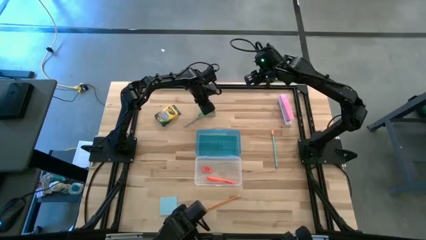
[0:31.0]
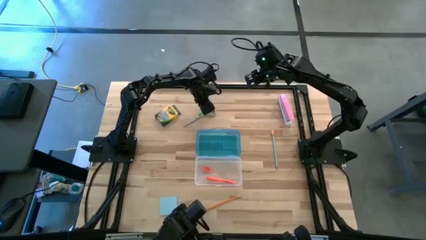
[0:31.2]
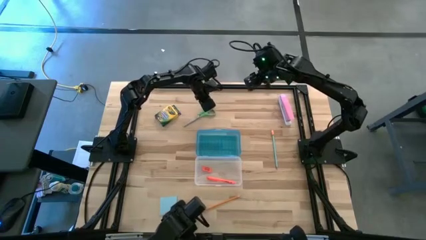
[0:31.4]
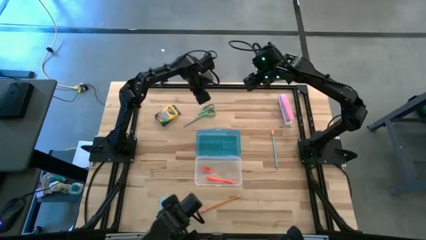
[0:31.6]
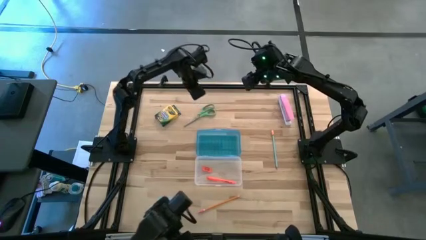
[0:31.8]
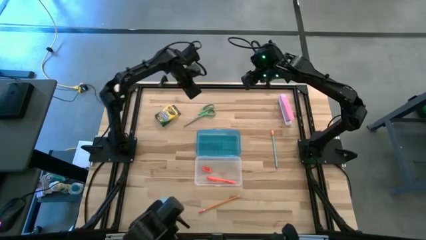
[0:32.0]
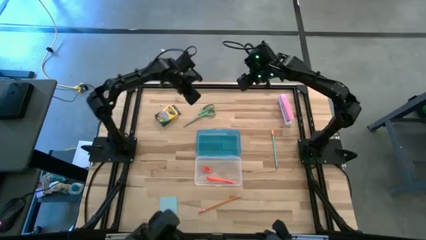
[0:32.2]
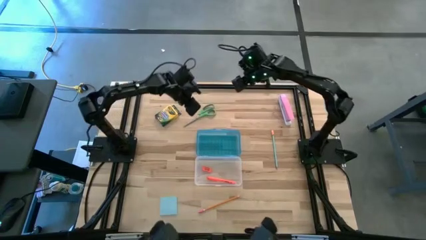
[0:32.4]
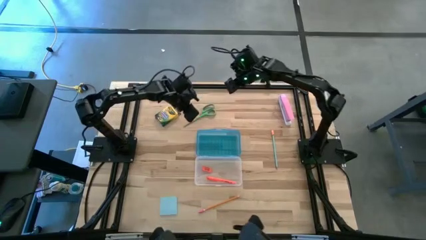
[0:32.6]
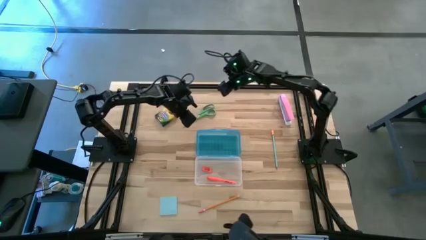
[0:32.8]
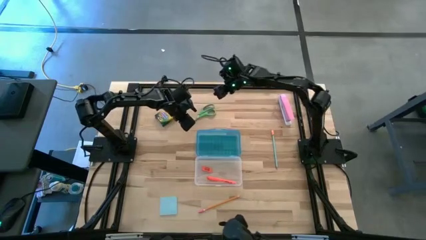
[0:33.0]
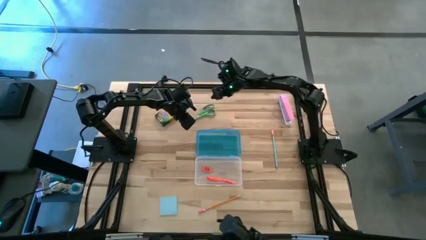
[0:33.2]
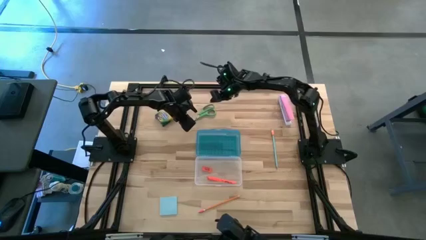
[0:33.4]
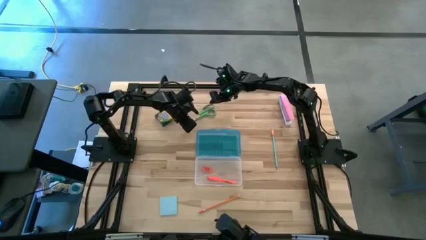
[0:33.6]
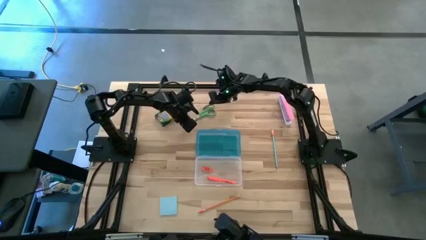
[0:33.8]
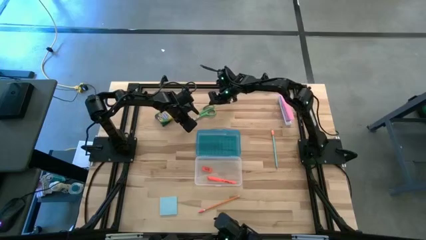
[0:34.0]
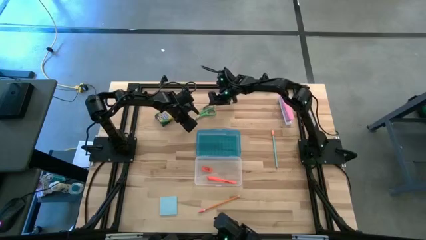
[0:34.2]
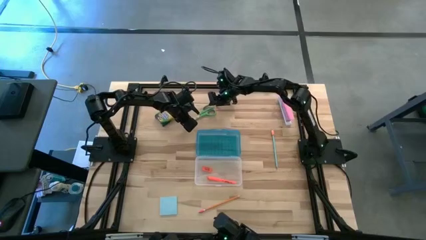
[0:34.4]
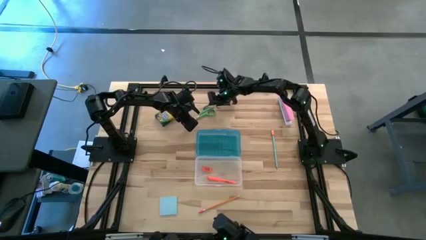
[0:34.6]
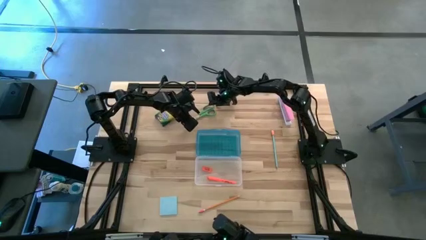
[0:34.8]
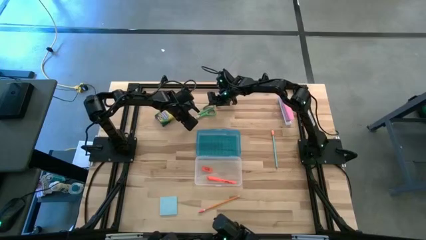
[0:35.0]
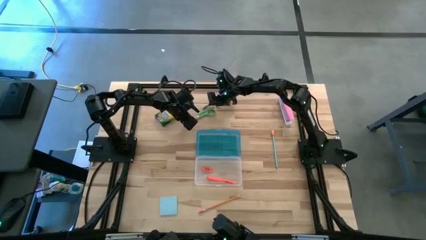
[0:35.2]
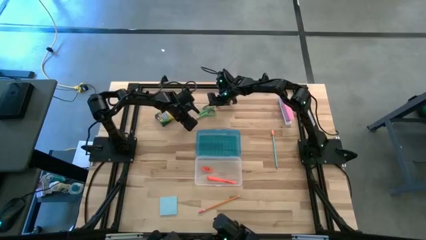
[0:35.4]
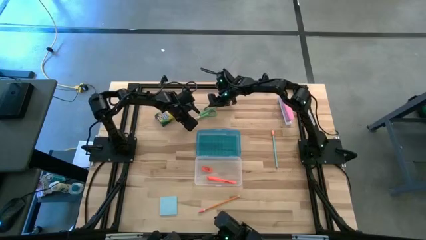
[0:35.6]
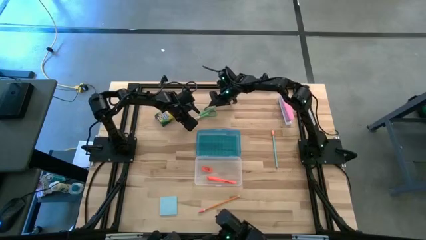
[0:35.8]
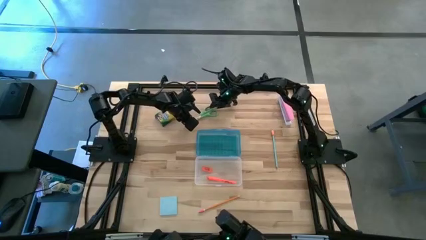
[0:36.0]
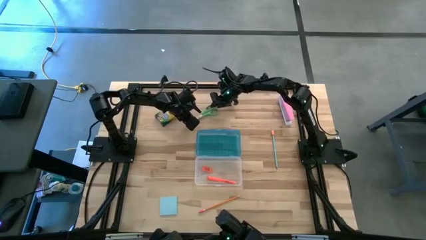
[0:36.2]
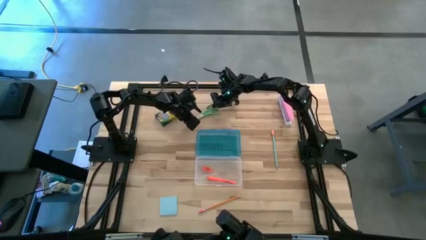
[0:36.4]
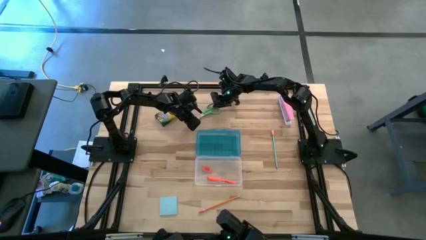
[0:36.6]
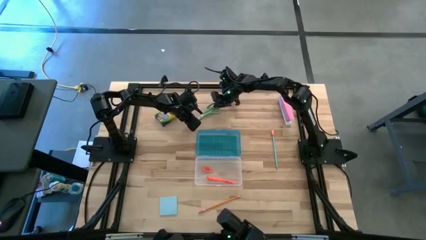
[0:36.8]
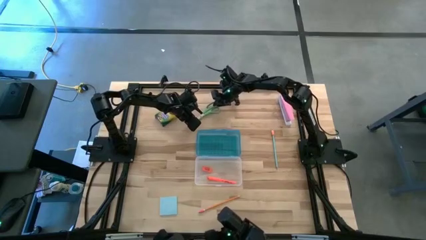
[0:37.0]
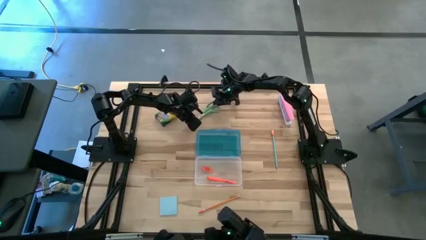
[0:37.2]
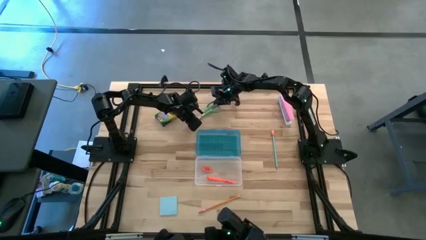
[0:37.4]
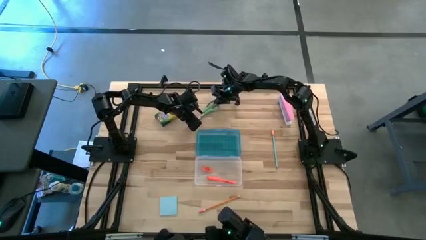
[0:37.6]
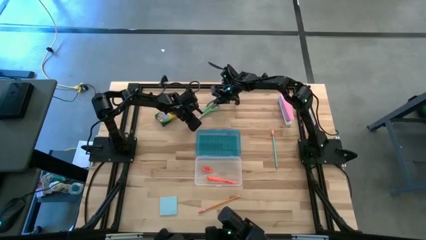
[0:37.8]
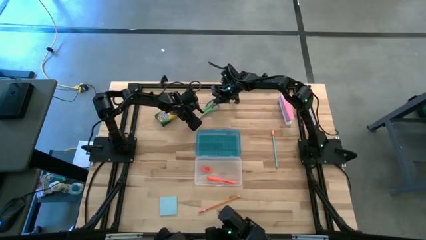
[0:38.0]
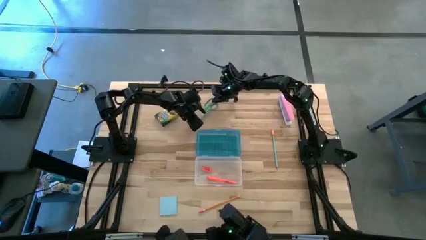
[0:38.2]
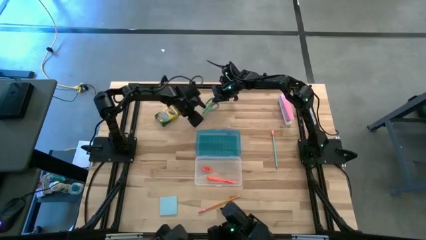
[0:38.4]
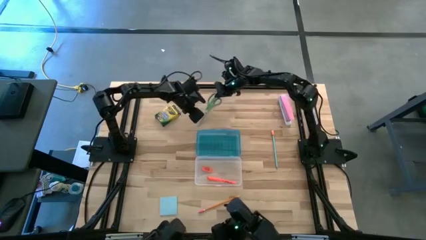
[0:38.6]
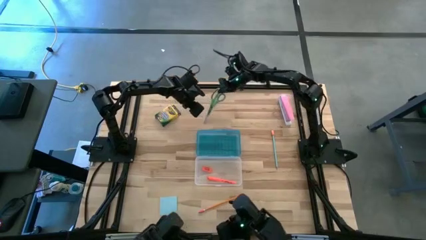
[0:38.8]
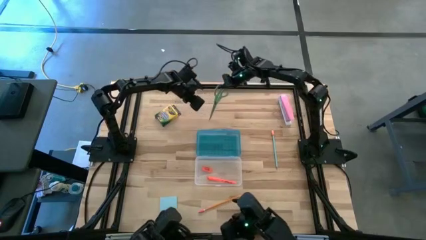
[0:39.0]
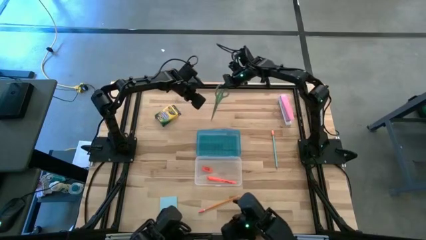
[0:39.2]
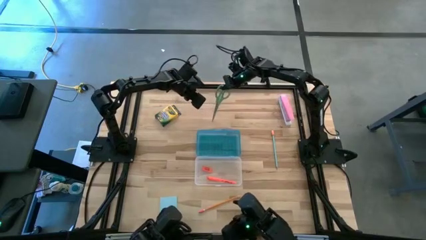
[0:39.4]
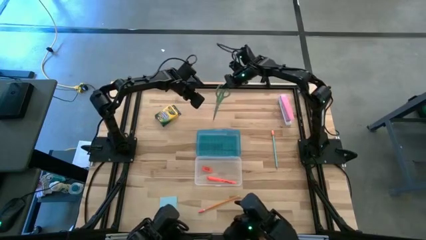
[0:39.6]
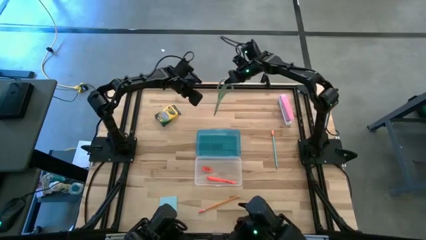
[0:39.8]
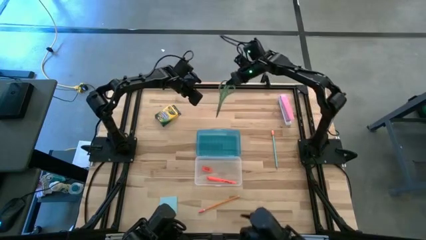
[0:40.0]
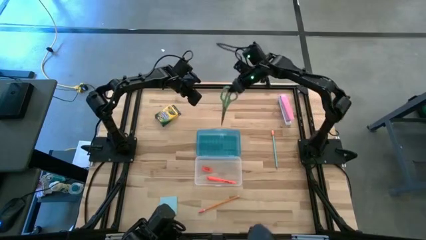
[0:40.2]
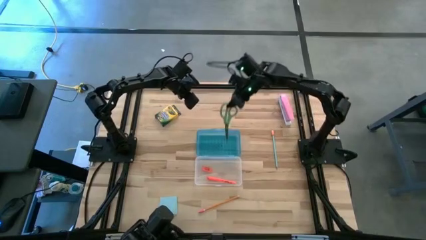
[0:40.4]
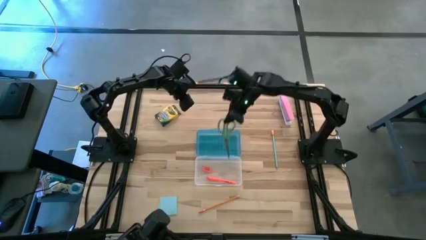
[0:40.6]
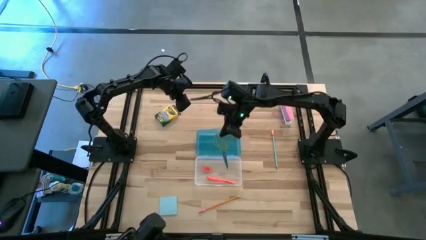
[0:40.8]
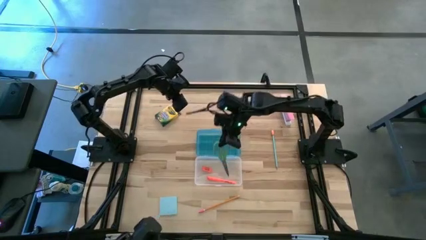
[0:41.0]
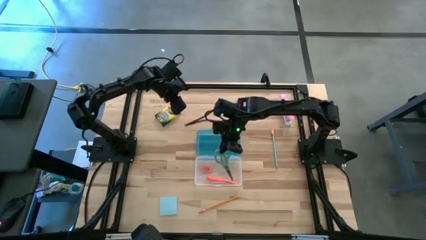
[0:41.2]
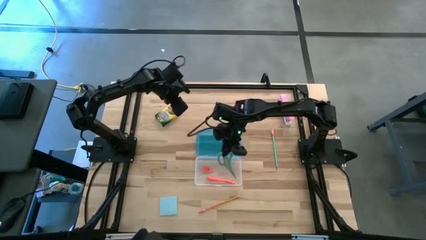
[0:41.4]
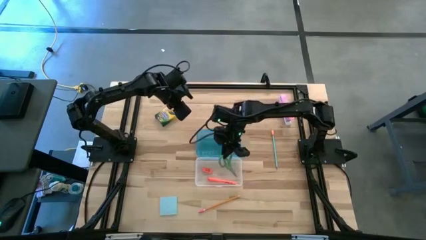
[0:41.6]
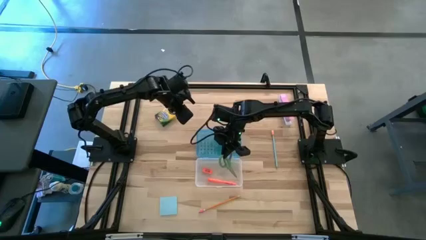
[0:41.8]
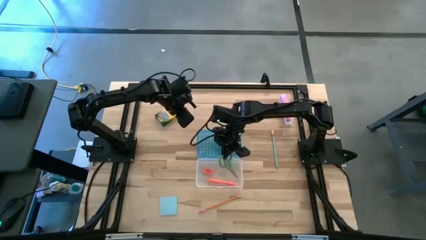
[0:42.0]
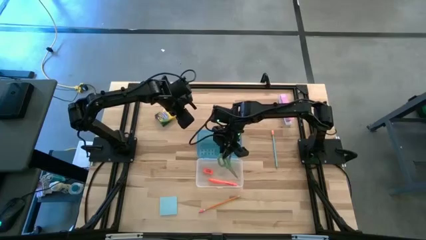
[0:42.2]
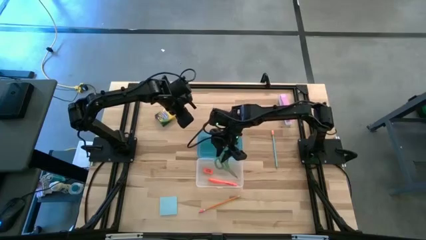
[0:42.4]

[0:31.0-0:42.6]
Task: Pack school essentials
Put the green scissors into the blue supply box

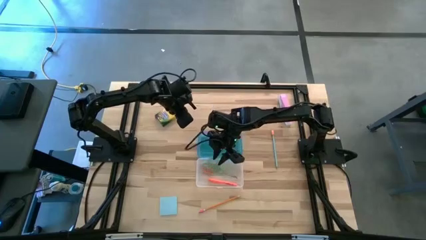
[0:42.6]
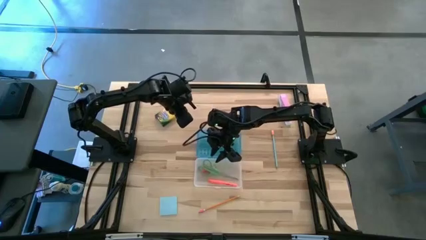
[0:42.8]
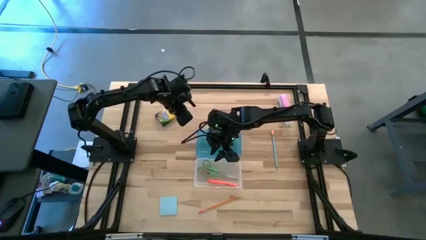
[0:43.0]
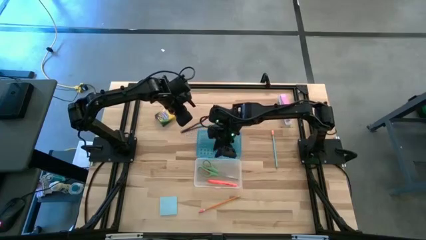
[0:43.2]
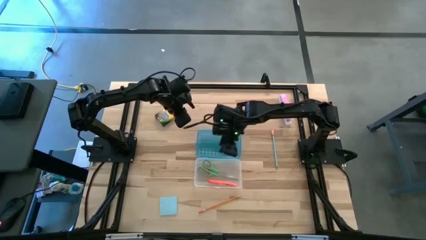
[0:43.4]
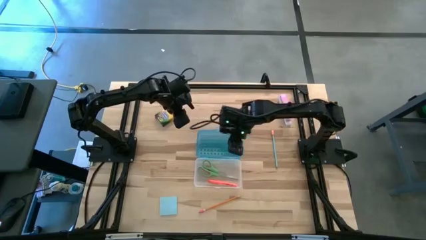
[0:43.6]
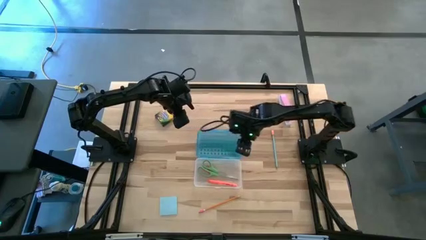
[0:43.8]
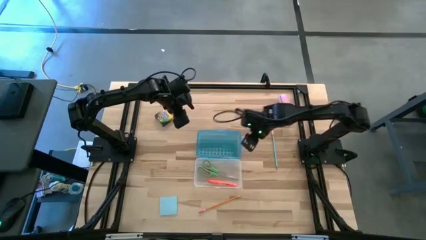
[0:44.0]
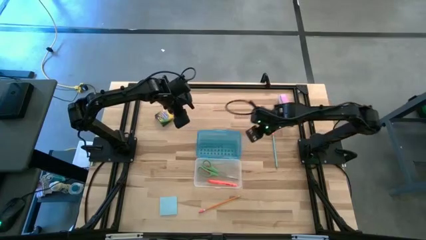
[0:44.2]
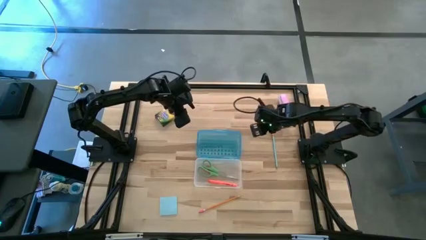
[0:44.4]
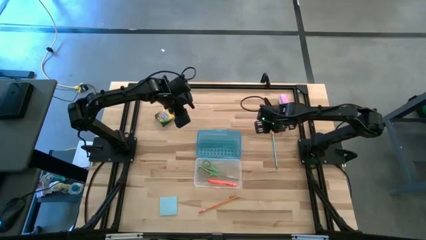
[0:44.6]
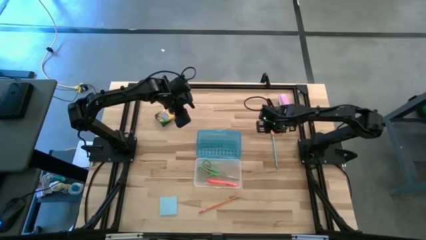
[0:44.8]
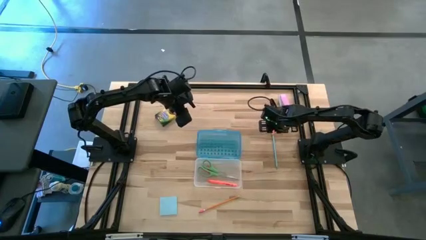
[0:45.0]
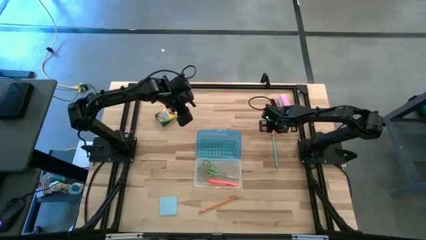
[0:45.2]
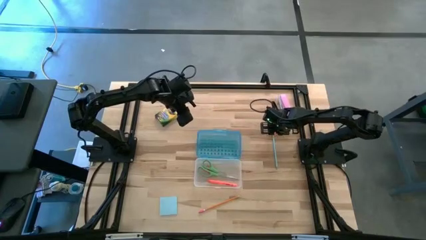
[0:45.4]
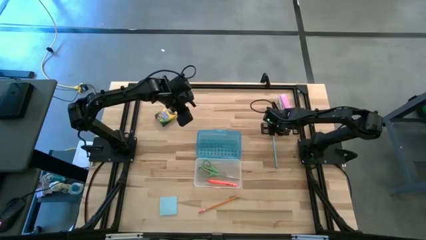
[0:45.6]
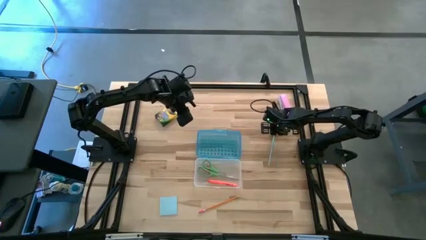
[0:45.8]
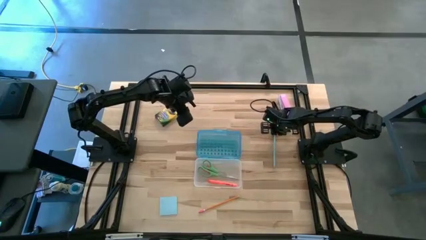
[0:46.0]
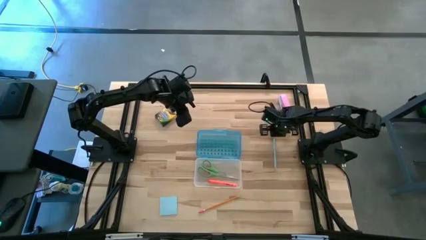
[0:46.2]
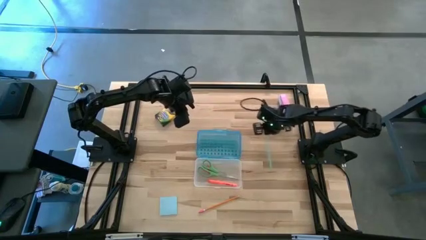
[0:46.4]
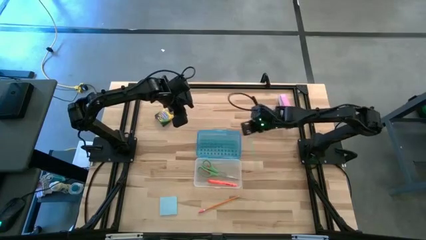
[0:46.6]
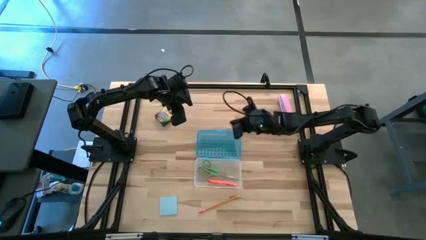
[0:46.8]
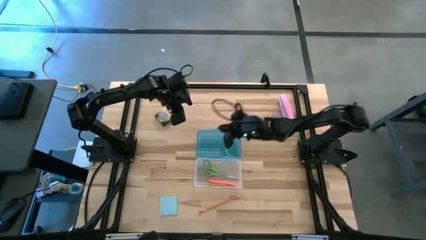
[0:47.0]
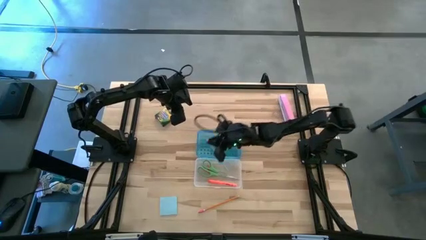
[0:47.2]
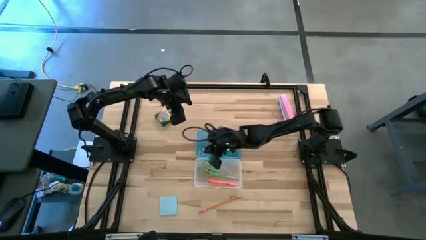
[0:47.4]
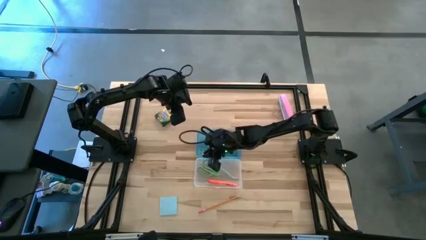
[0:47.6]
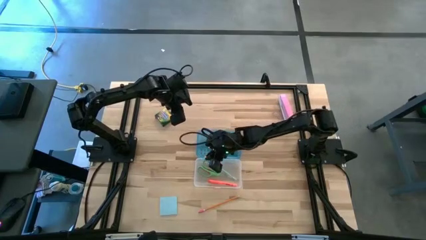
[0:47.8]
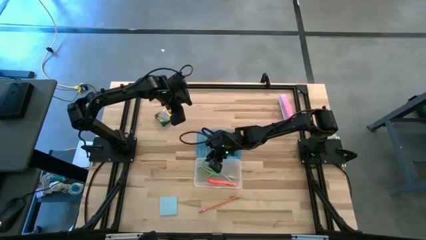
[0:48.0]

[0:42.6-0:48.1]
Put the blue pencil into the blue supply box
